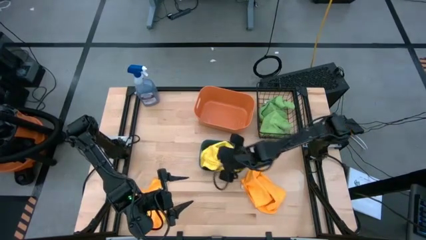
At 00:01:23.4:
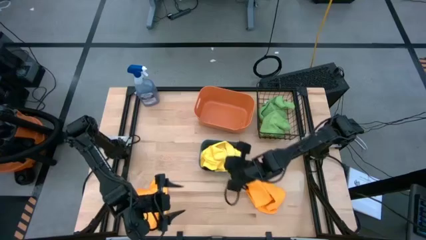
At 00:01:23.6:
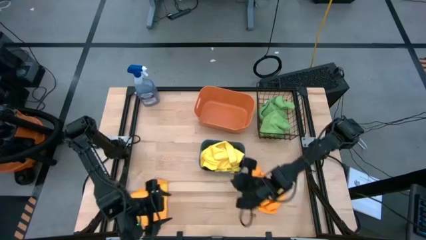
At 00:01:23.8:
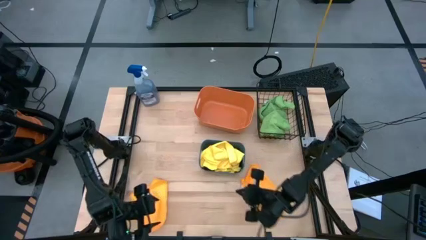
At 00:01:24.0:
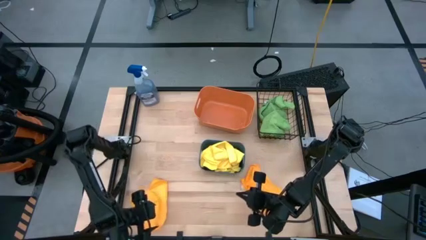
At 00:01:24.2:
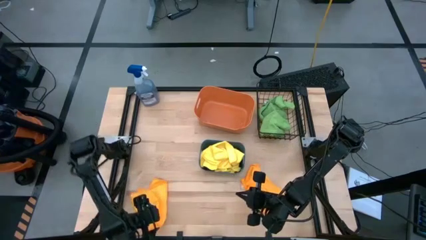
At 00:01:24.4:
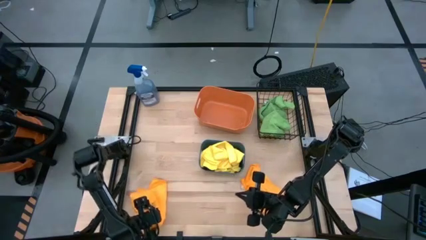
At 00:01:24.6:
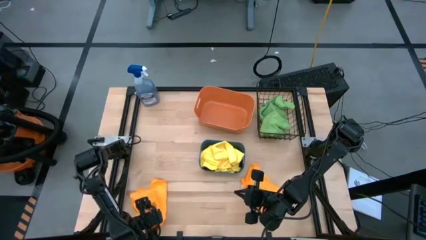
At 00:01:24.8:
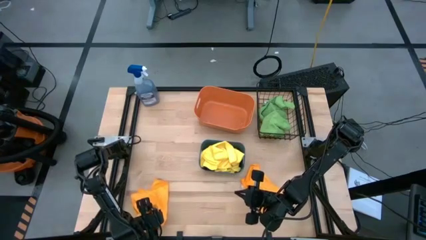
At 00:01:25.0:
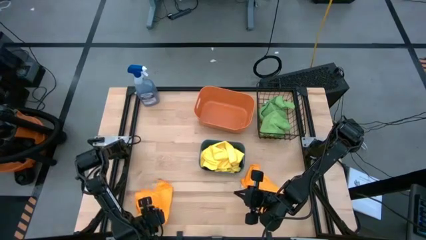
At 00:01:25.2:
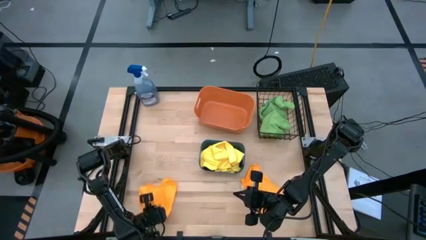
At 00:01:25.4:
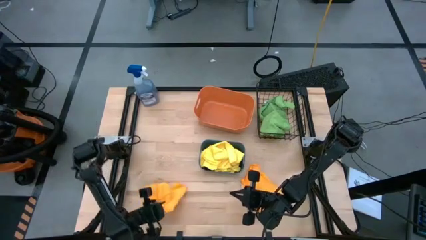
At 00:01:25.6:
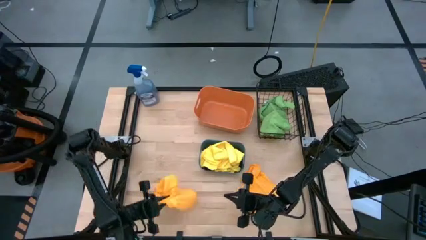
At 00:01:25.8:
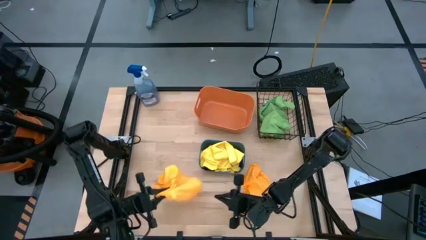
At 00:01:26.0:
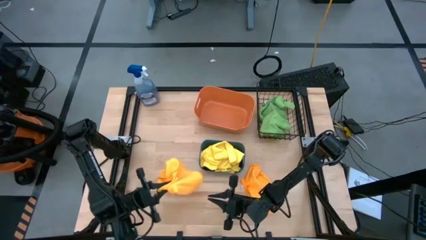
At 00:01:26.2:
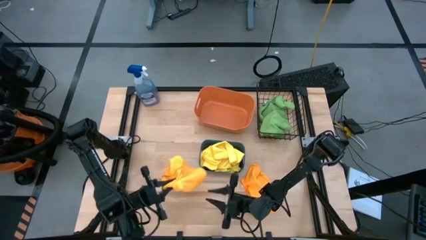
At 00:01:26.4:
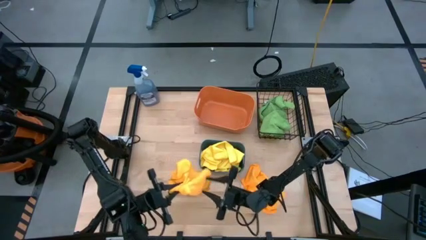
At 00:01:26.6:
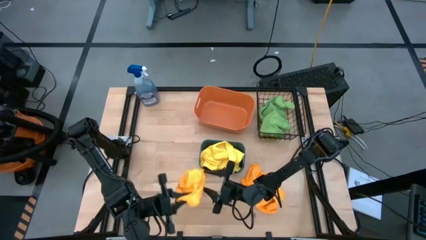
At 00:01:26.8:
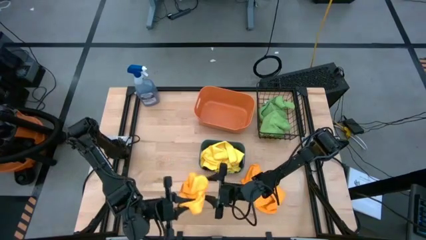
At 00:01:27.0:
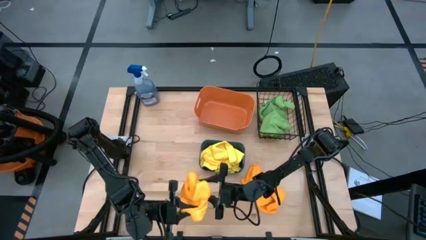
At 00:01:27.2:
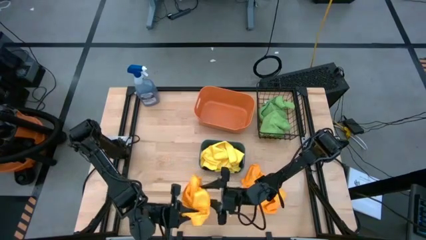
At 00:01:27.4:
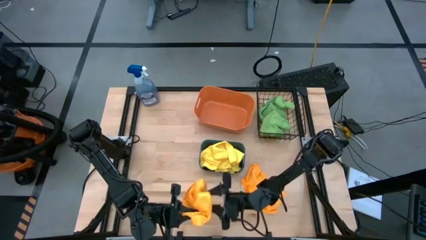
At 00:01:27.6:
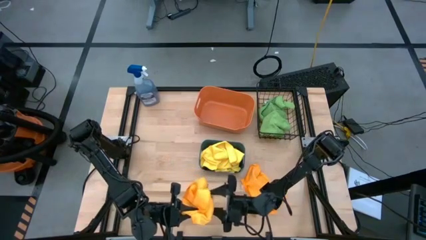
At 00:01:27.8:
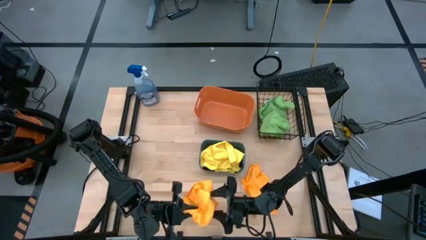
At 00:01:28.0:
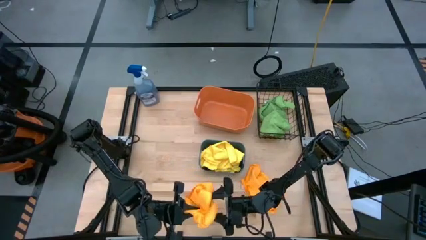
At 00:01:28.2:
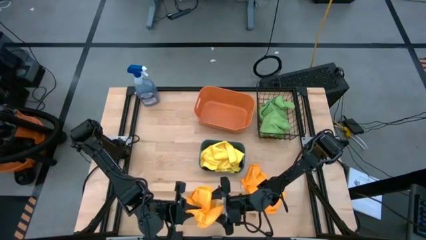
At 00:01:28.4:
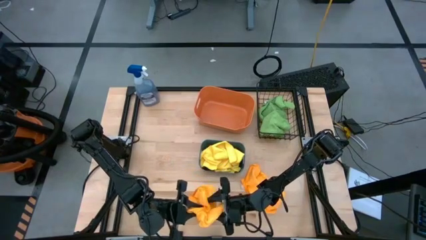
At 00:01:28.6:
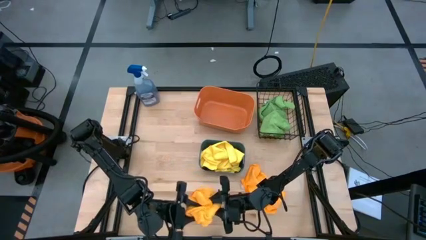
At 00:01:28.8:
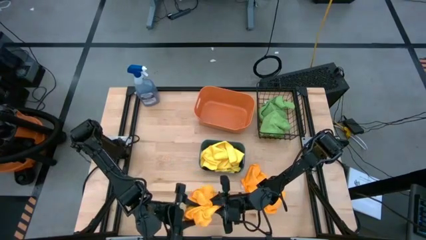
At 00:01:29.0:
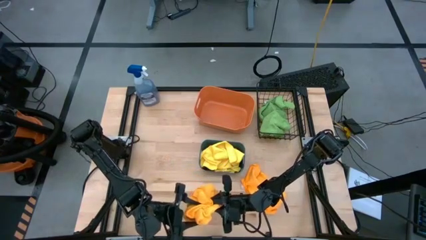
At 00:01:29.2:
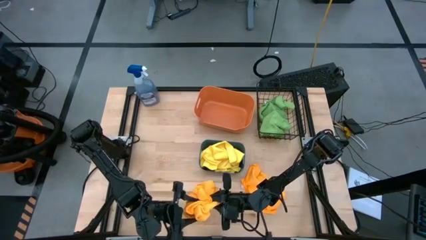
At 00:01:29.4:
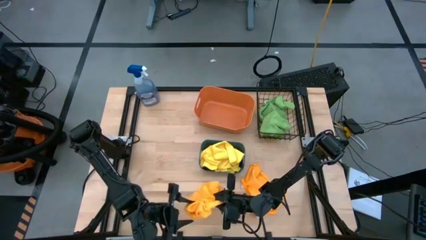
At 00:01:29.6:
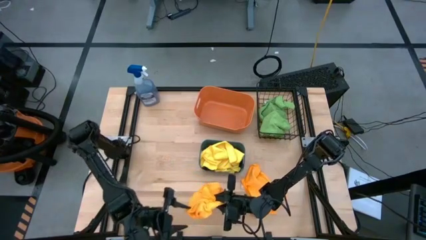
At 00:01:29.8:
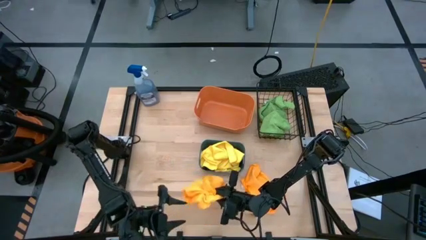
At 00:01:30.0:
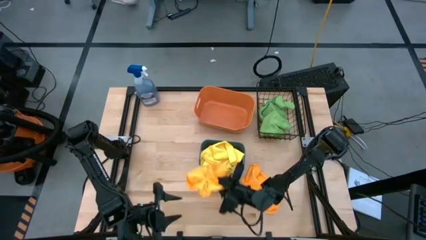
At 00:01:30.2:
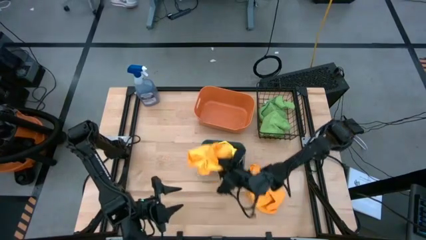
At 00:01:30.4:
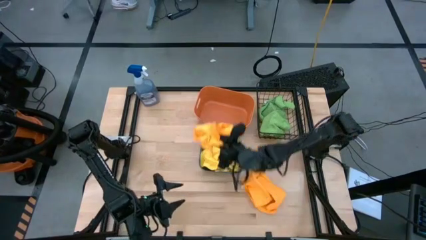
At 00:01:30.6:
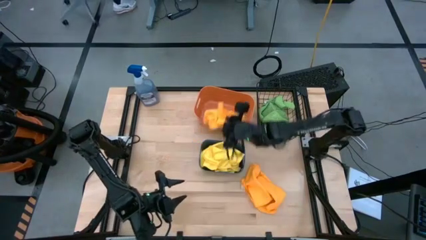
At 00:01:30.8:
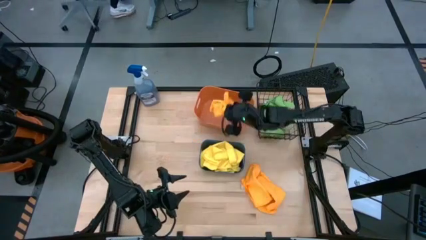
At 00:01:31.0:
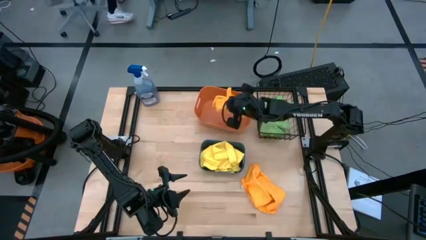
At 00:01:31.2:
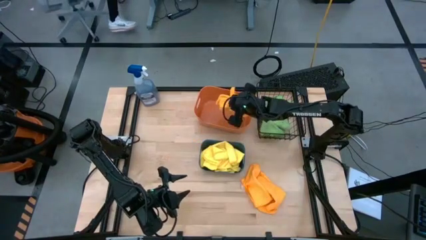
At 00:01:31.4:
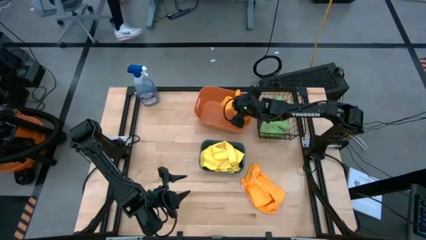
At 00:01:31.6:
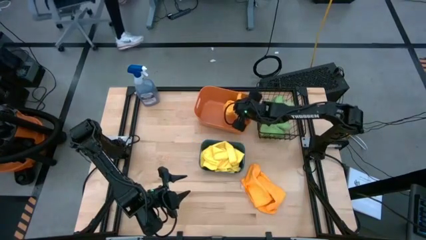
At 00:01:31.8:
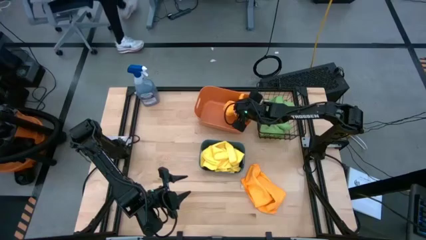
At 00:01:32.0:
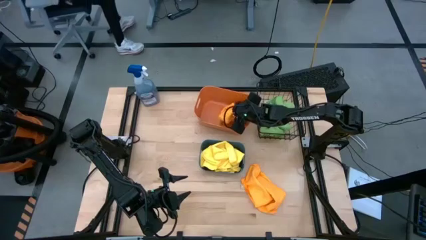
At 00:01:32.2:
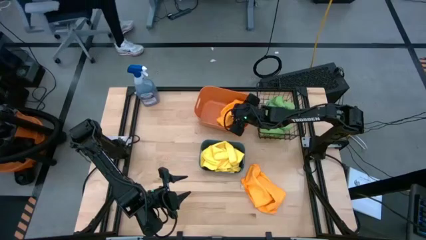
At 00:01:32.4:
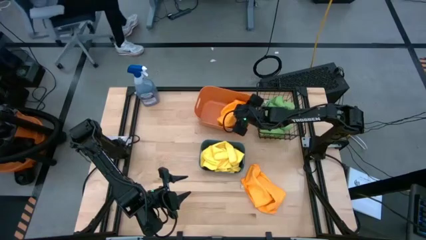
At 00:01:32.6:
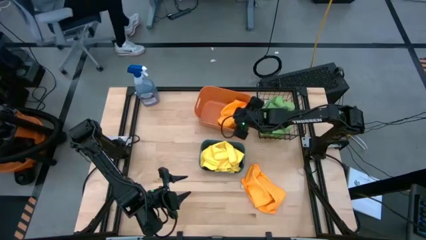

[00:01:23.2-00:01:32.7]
Task: Sort microfiber towel by color & place in baskets
Put the left orange microfiber towel into the orange bin

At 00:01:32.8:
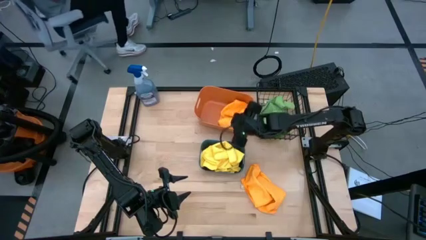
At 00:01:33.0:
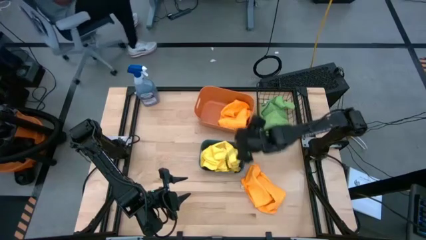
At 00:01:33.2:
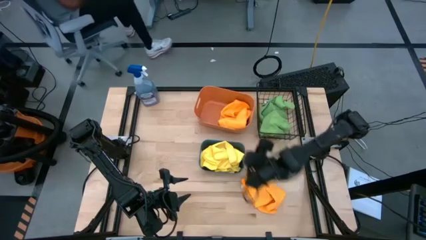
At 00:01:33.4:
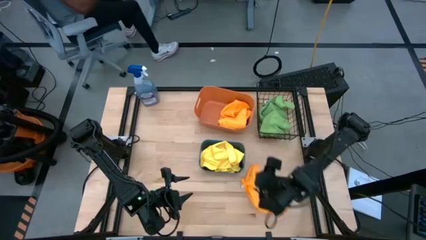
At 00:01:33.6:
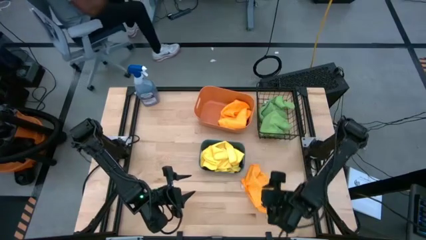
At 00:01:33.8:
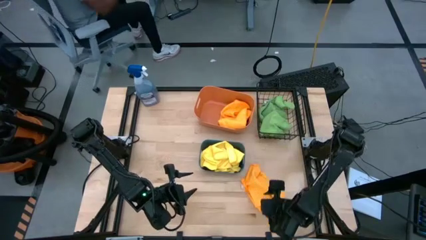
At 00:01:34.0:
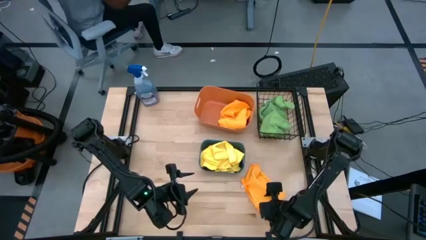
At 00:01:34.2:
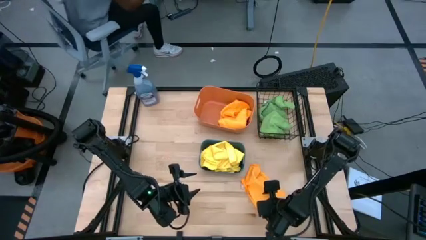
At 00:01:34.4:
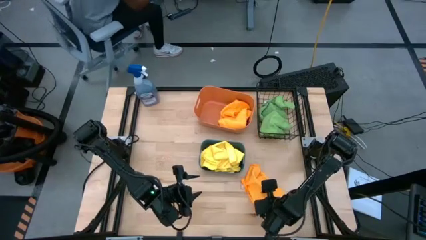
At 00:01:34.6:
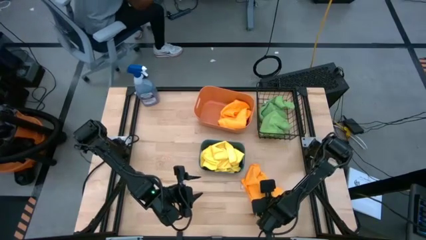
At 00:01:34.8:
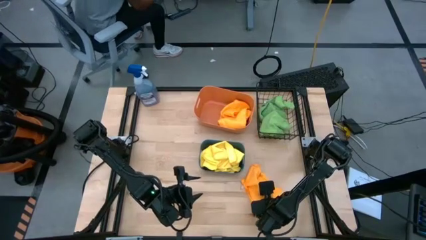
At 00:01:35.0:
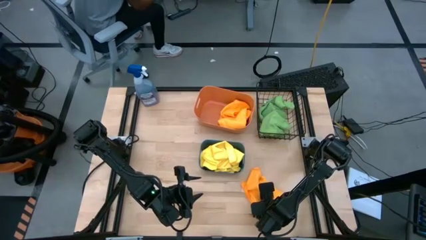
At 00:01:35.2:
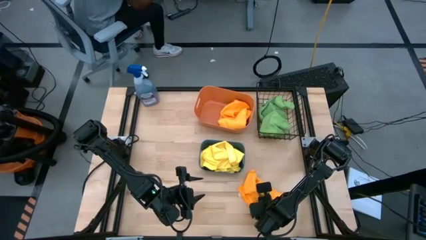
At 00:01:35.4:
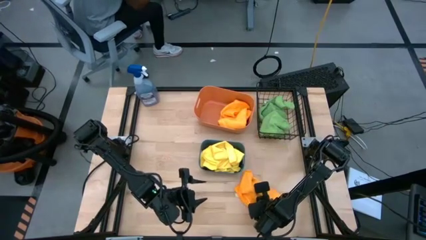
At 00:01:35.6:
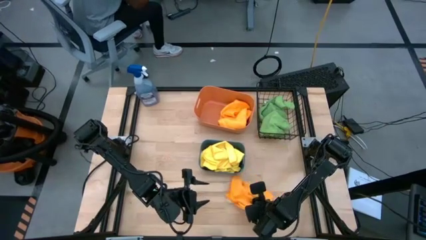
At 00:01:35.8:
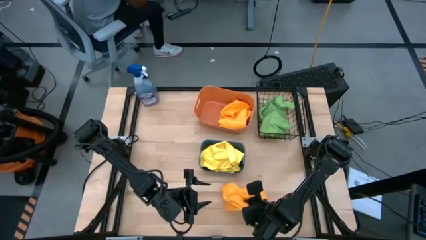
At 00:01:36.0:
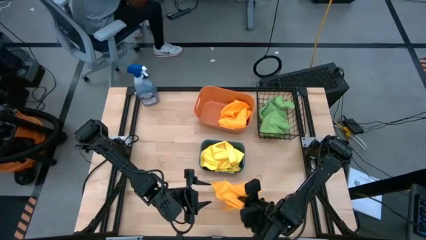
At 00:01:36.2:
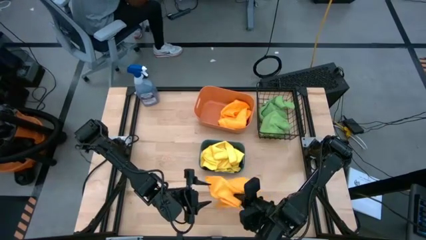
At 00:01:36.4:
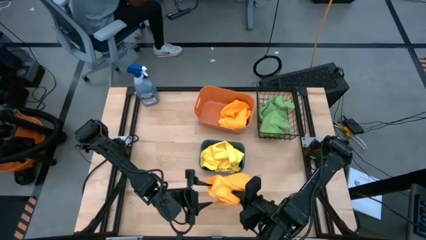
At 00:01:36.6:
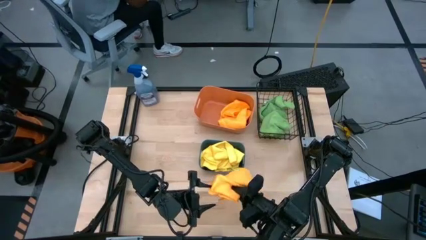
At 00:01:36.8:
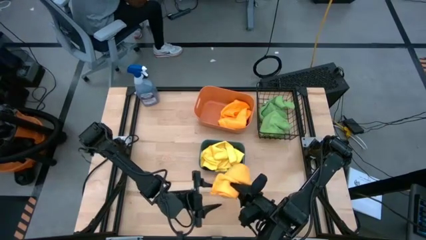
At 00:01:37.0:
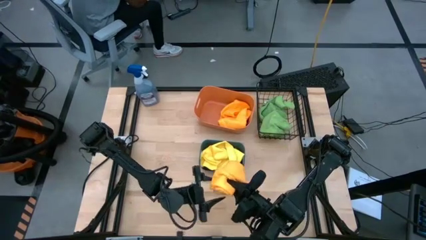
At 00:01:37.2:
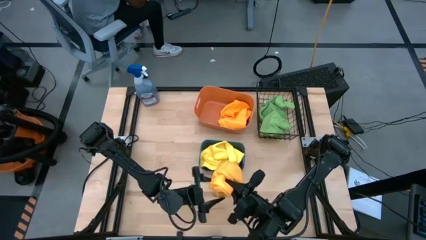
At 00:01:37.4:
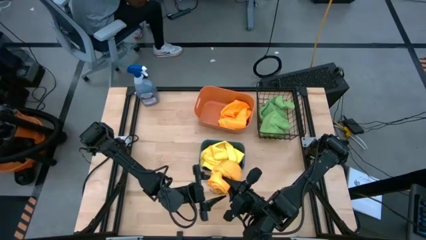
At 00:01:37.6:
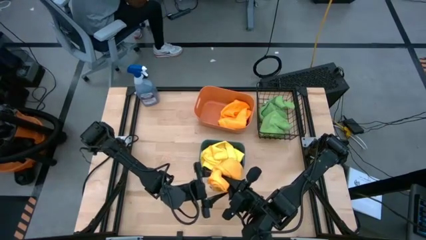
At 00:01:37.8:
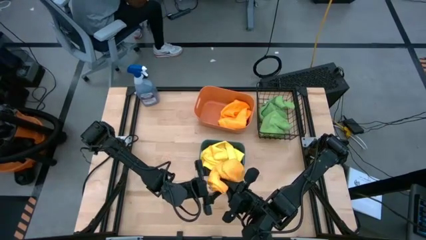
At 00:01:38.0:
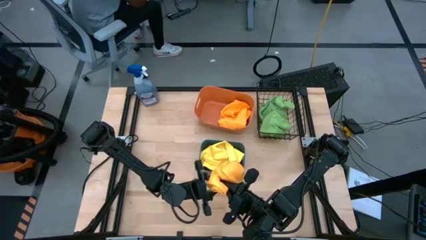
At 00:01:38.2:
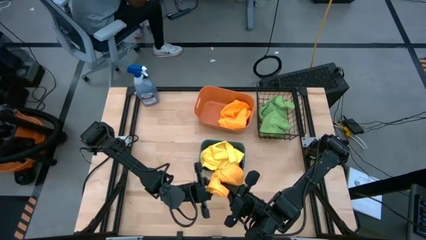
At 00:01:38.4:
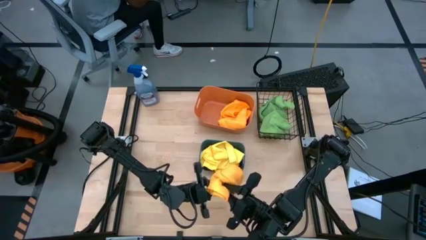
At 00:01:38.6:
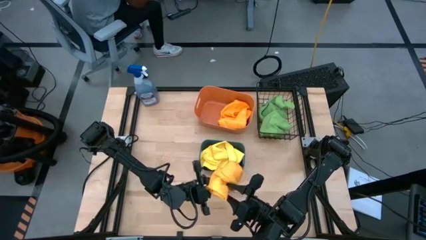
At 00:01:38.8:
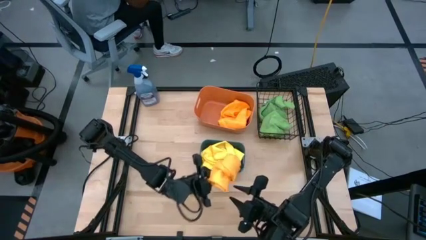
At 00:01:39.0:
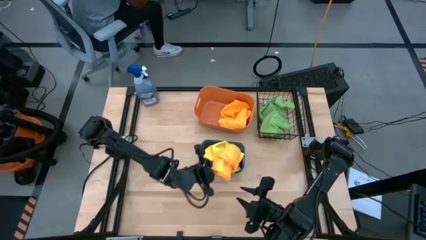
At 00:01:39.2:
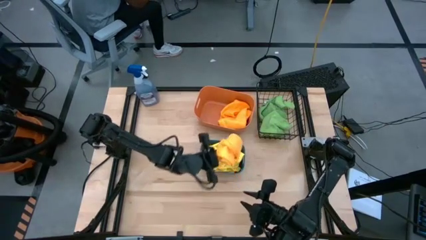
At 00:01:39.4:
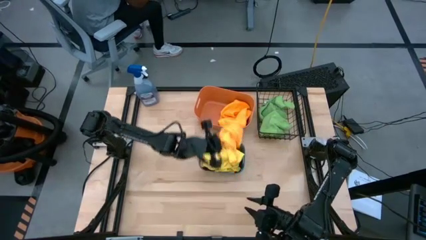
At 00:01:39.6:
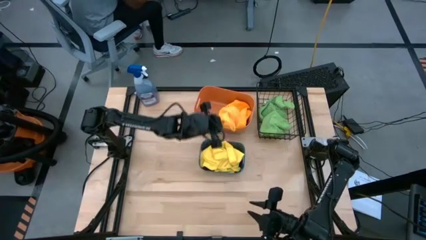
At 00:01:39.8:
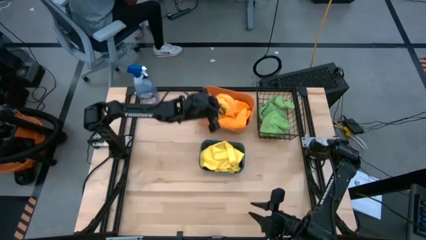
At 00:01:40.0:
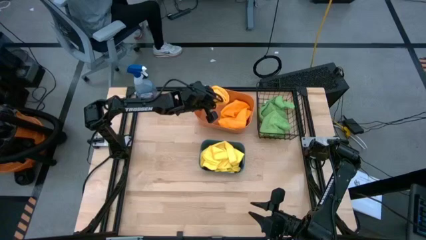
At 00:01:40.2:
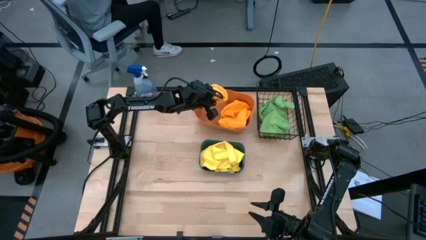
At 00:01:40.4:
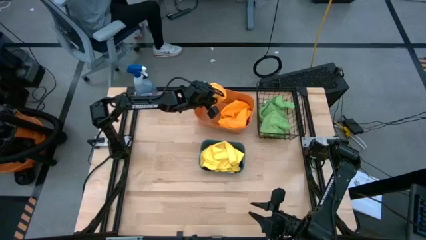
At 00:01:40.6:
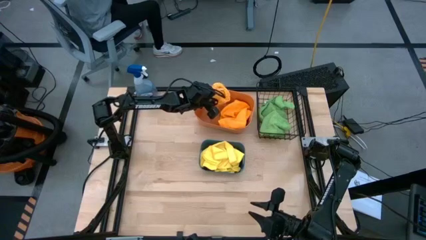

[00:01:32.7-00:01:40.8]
Put the orange microfiber towel into the orange bin
